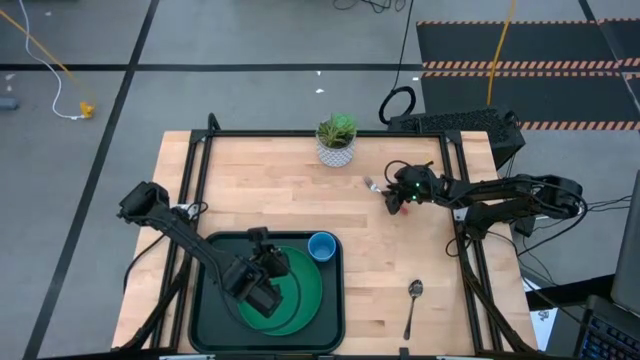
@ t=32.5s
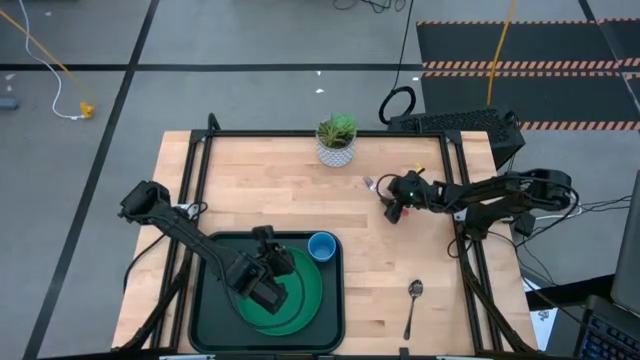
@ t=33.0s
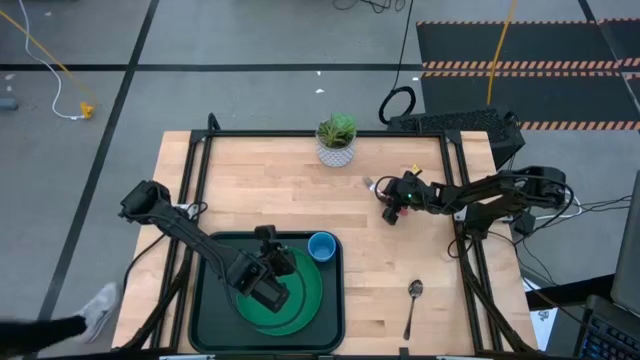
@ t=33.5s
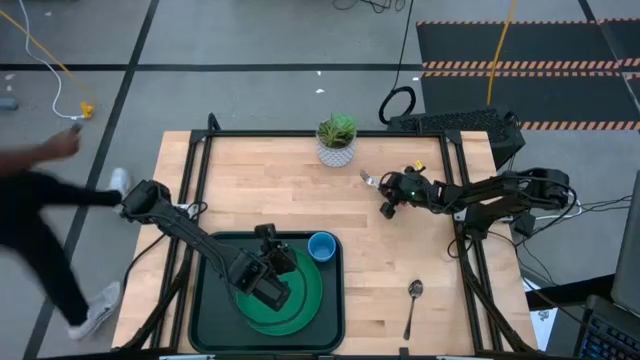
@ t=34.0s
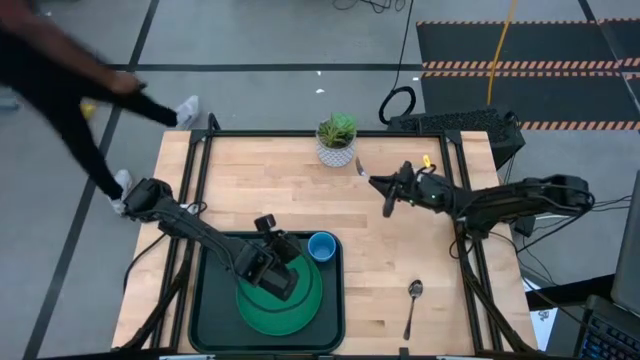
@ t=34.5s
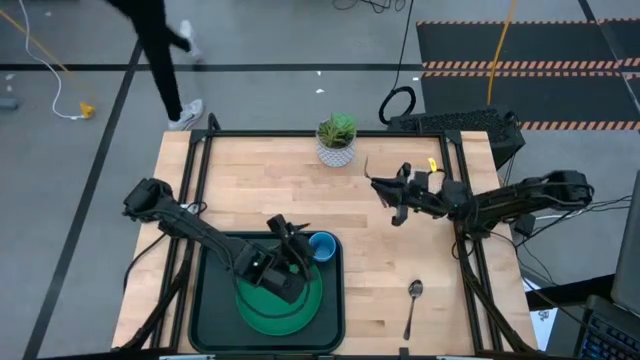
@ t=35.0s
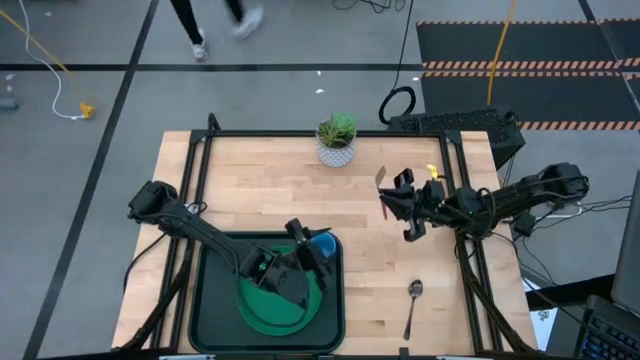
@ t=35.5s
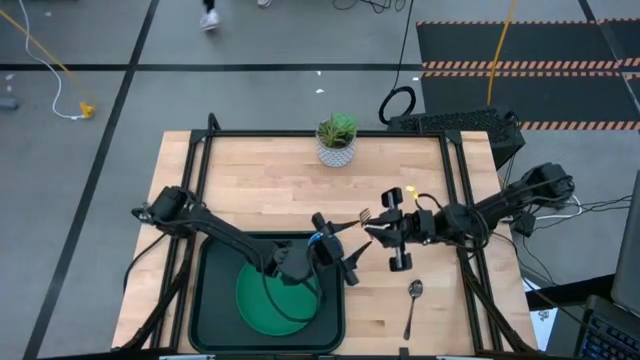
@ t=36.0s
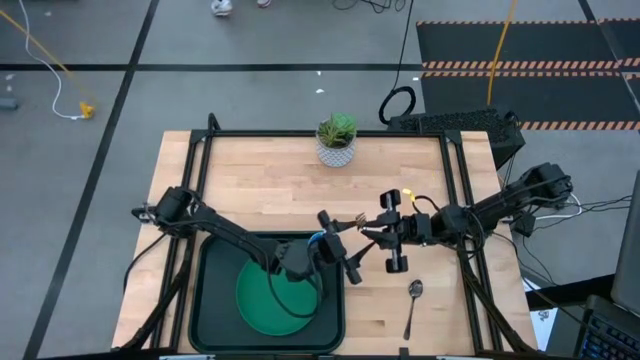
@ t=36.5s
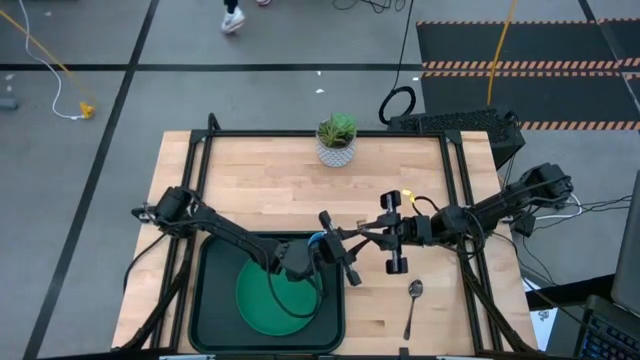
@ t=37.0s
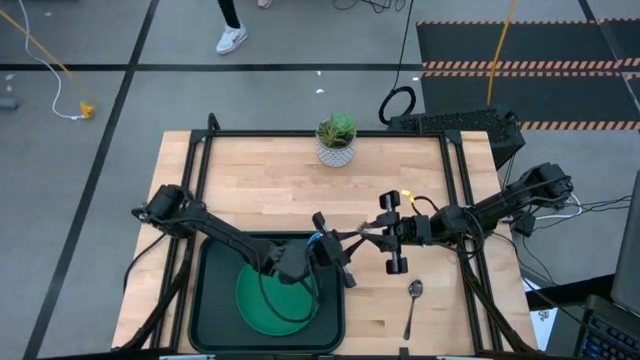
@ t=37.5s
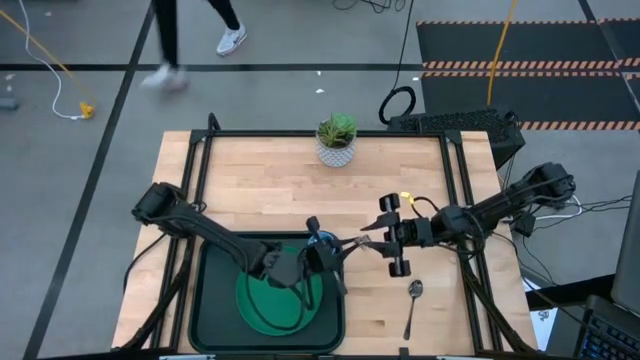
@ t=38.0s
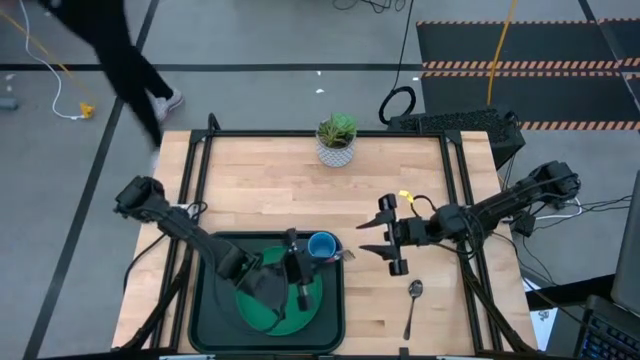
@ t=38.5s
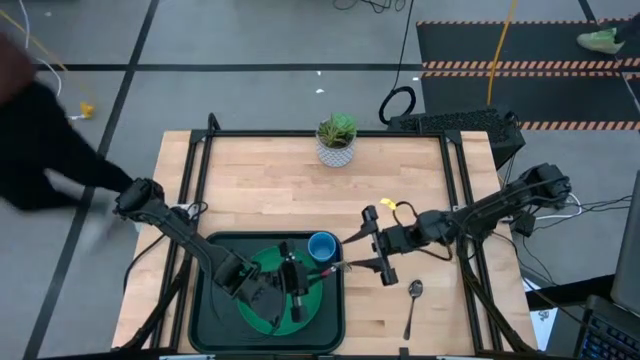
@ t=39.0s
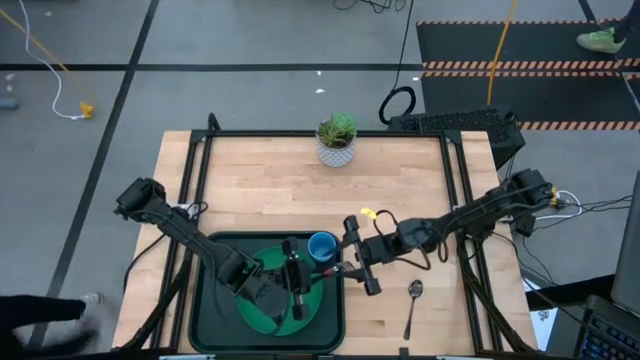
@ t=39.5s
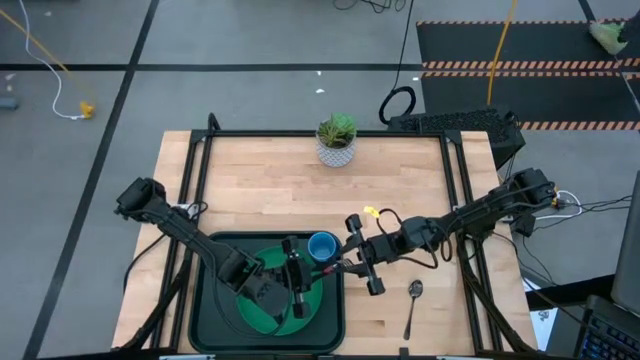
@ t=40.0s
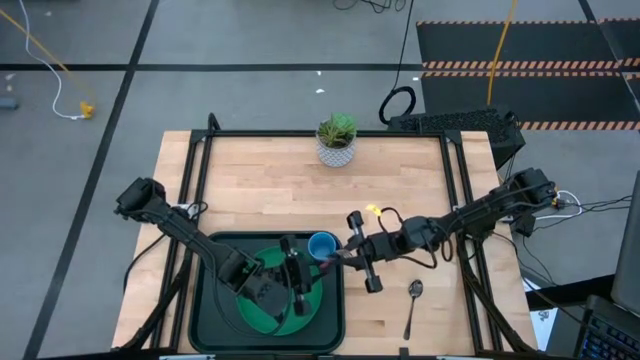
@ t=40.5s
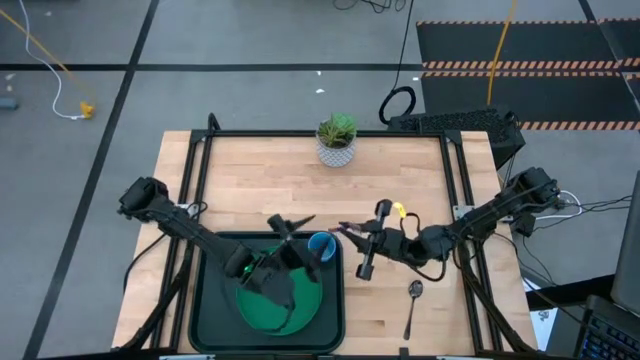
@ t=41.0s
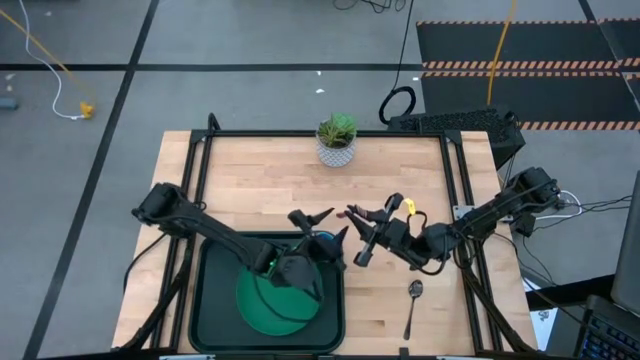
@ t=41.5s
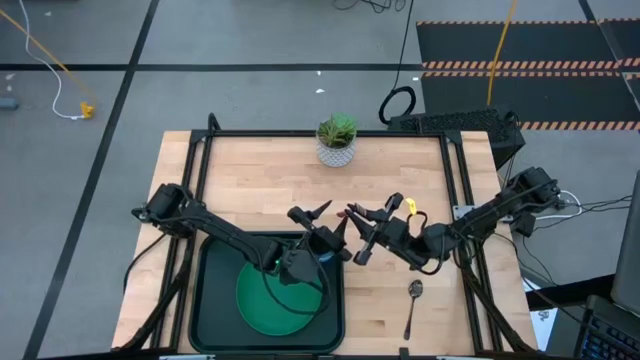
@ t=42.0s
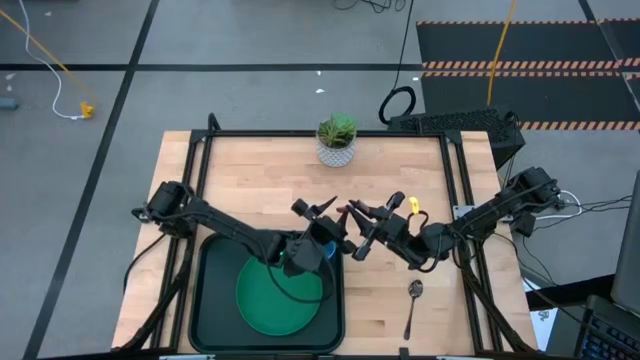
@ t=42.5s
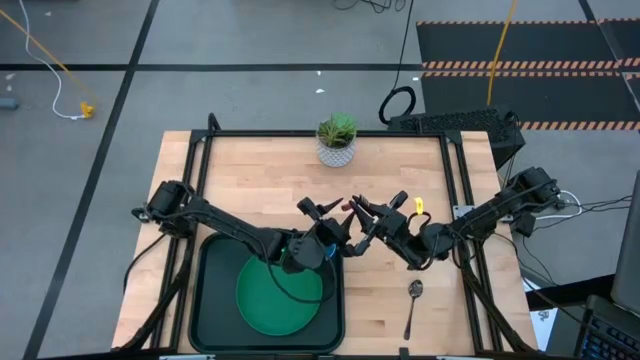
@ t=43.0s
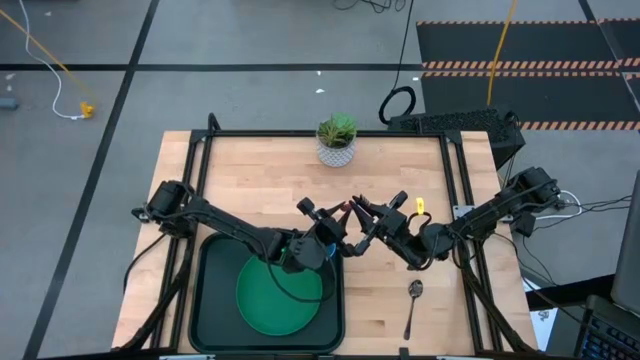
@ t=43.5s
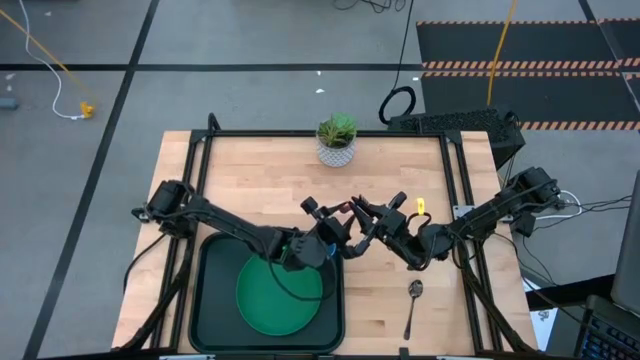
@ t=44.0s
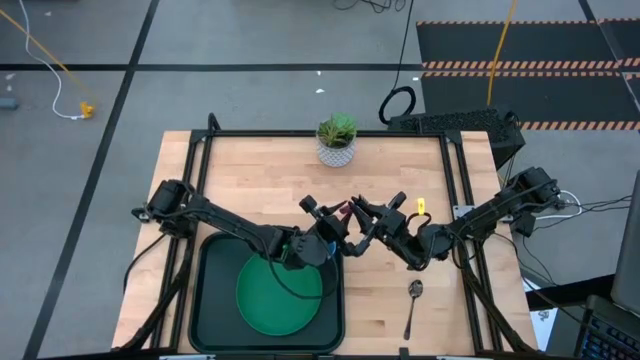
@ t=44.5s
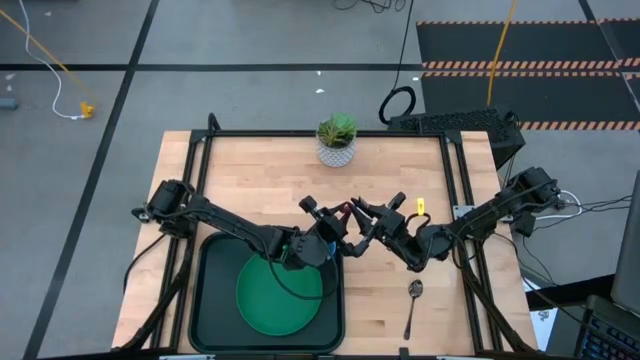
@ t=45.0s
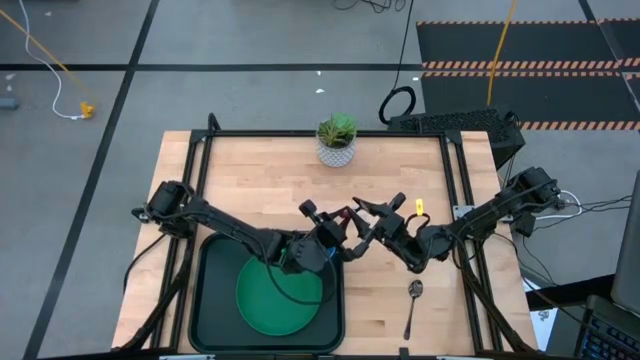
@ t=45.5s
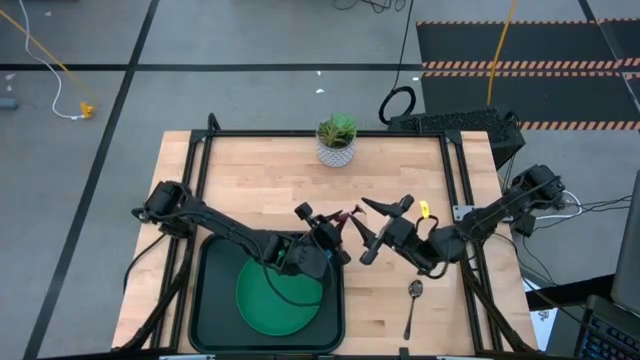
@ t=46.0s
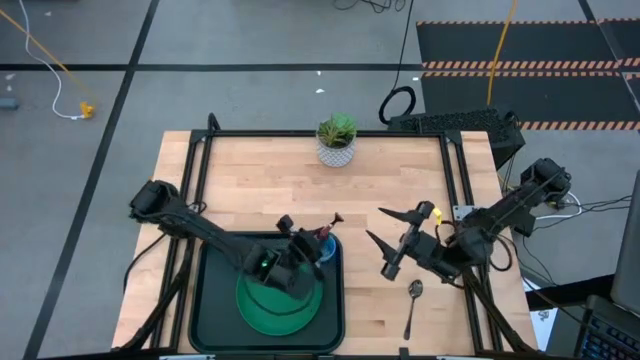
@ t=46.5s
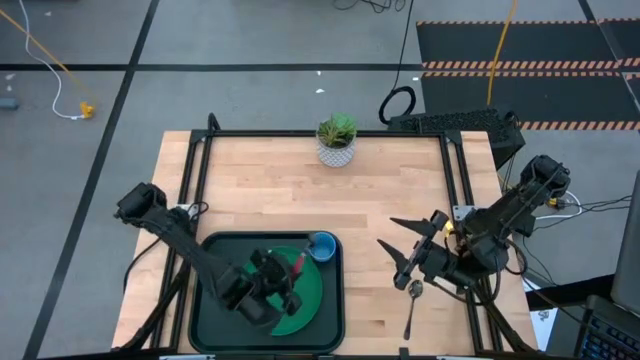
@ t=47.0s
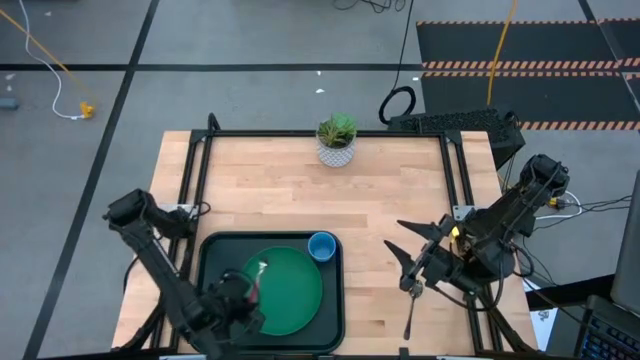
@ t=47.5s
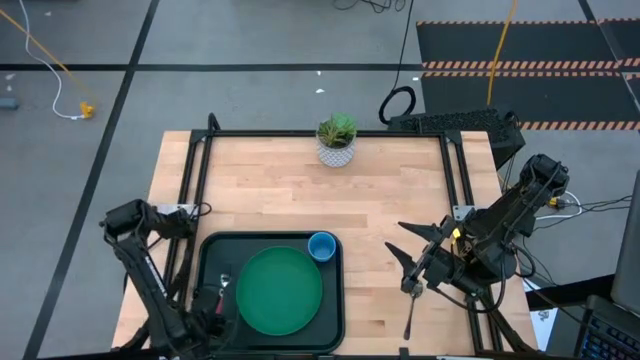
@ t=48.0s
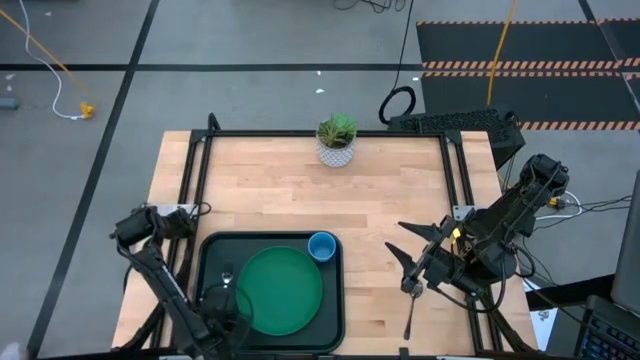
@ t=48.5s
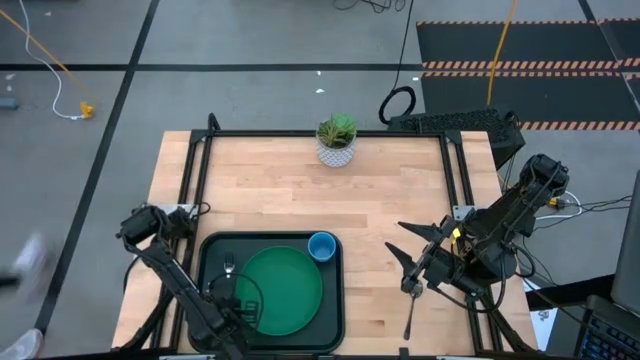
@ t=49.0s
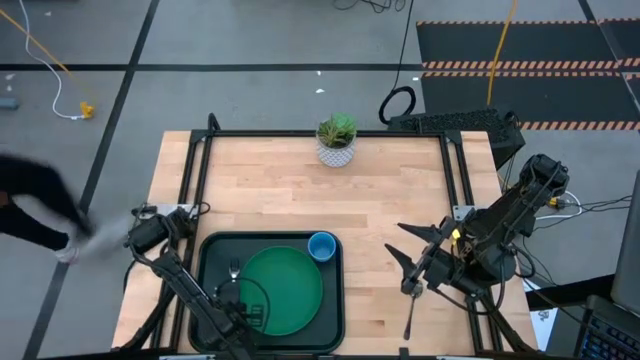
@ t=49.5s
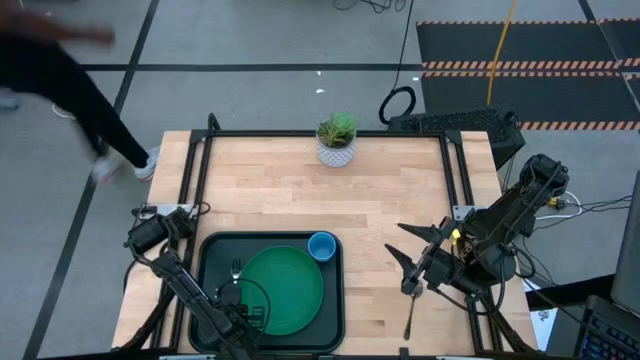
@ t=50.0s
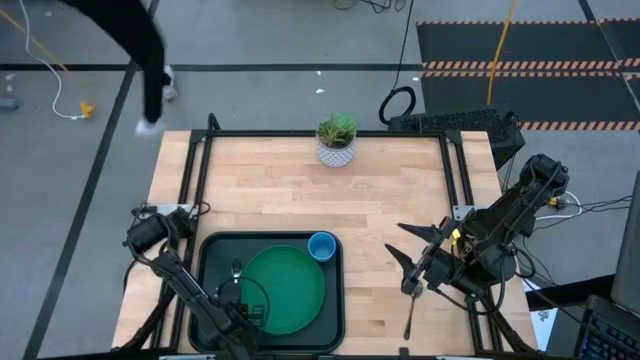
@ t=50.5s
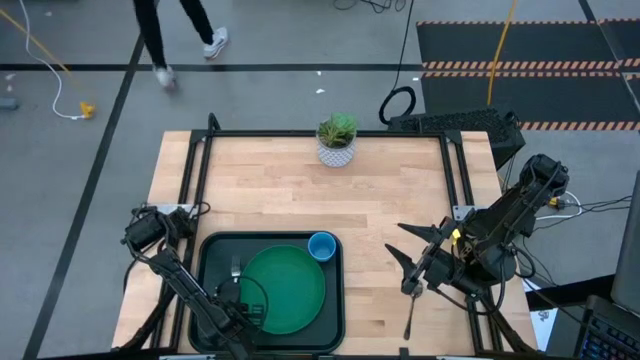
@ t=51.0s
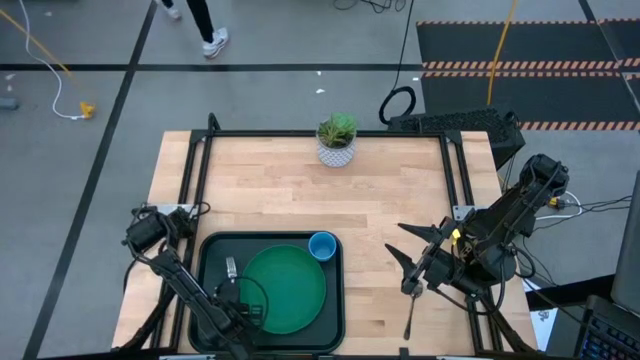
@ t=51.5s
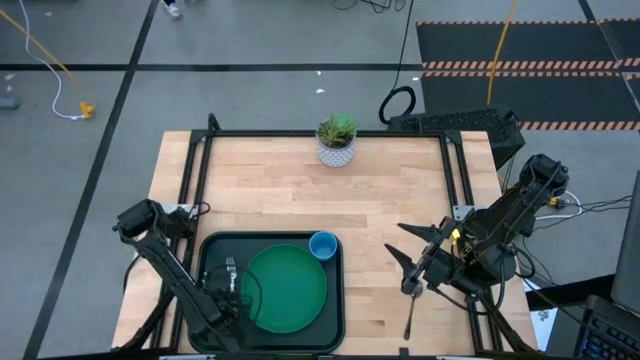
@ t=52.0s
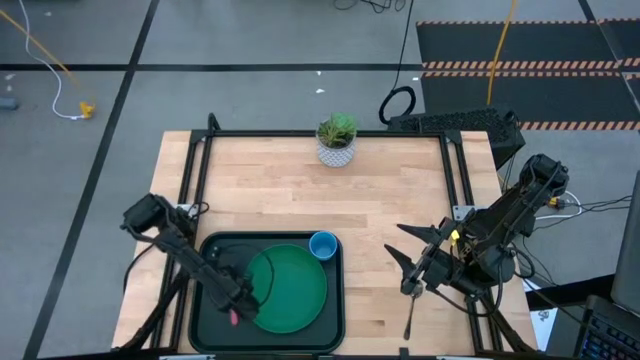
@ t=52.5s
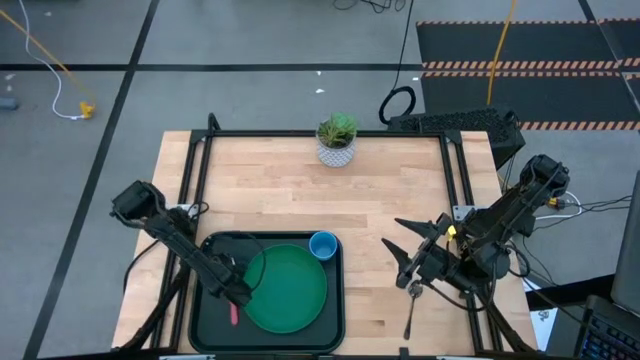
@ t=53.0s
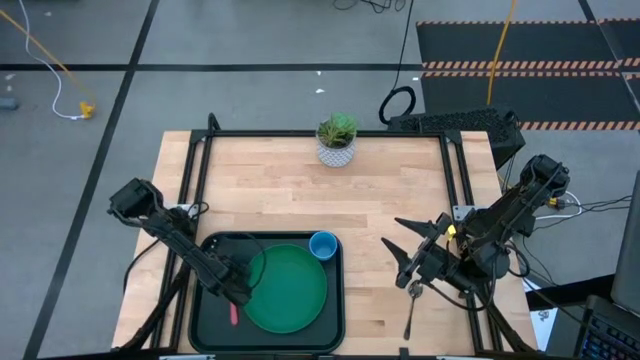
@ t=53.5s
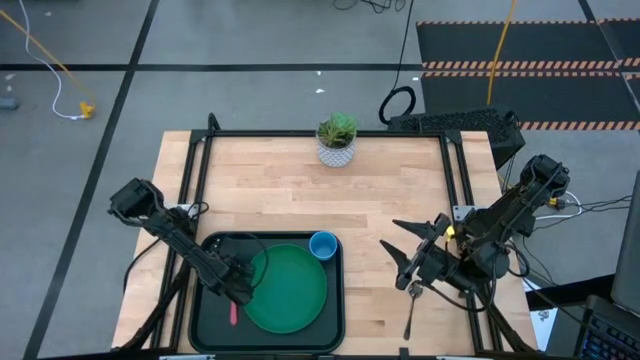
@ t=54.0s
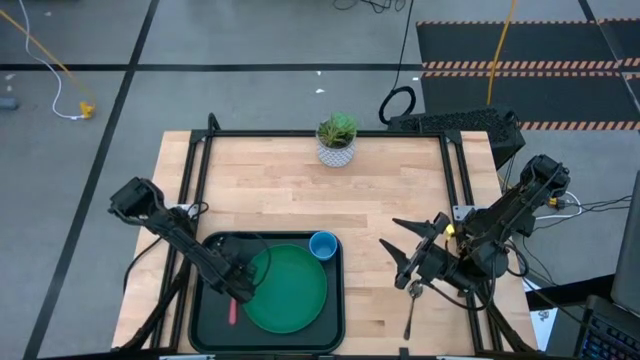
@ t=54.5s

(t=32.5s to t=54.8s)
Task: Pick and place plate/cup/fork/spoon on tray
Put the red fork on the black tray to the left of the green plate
